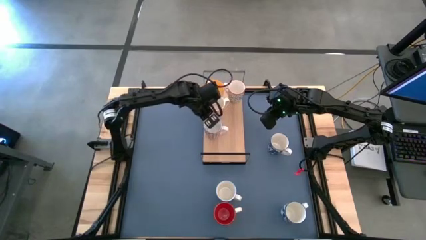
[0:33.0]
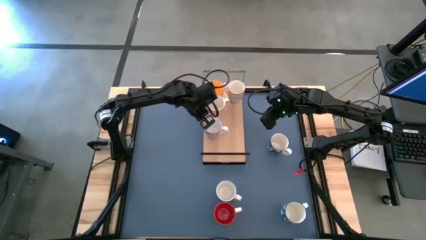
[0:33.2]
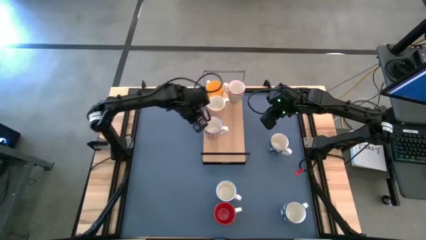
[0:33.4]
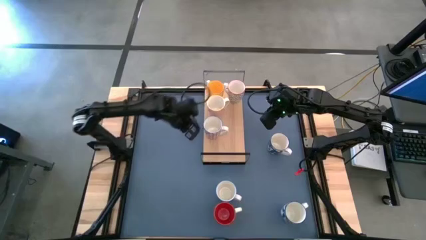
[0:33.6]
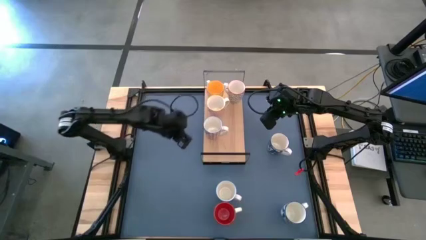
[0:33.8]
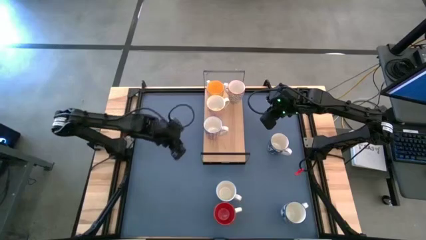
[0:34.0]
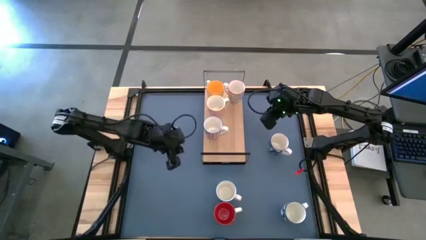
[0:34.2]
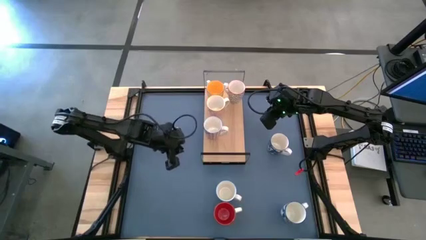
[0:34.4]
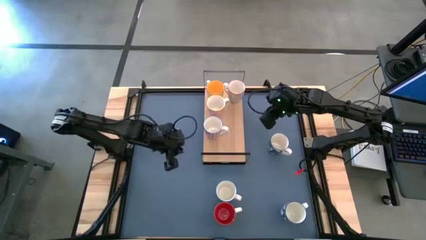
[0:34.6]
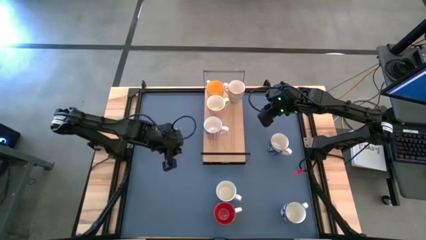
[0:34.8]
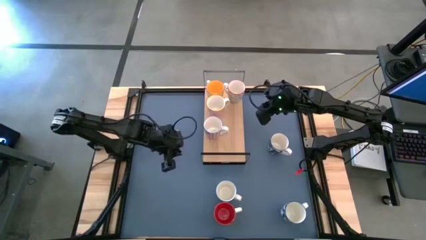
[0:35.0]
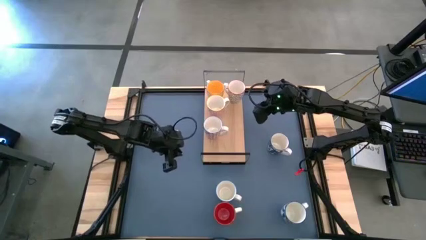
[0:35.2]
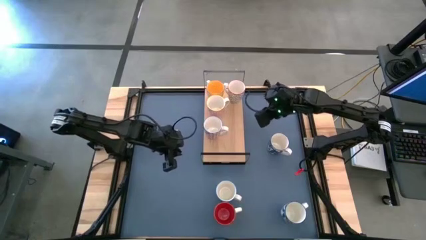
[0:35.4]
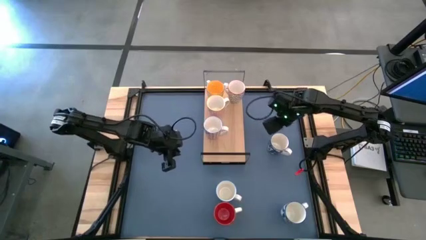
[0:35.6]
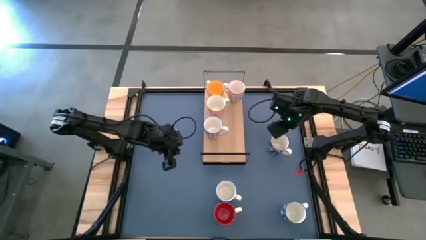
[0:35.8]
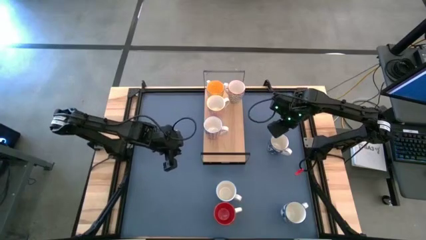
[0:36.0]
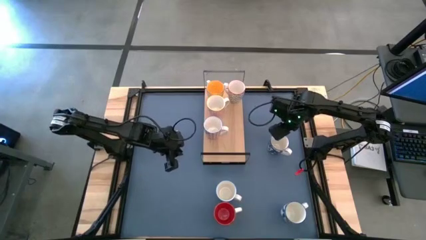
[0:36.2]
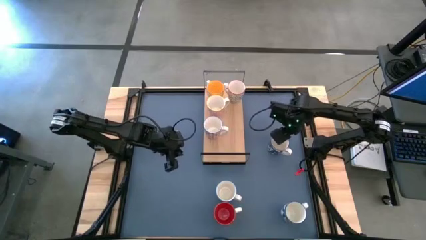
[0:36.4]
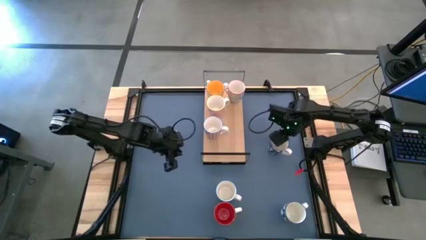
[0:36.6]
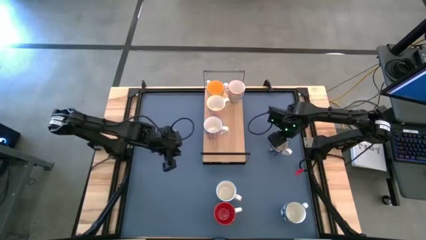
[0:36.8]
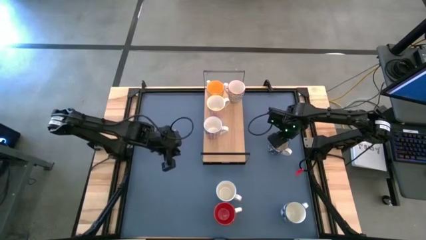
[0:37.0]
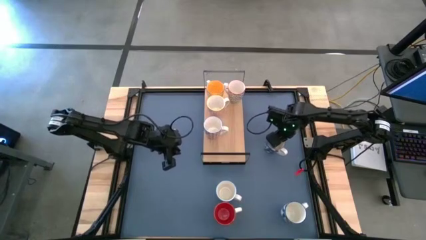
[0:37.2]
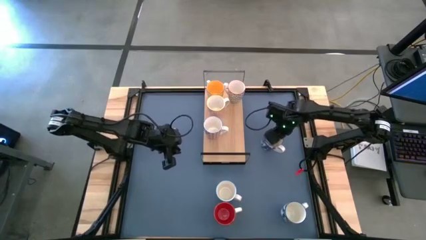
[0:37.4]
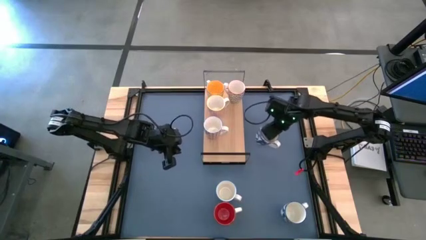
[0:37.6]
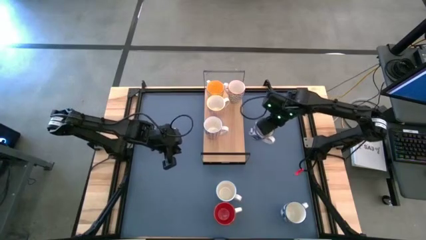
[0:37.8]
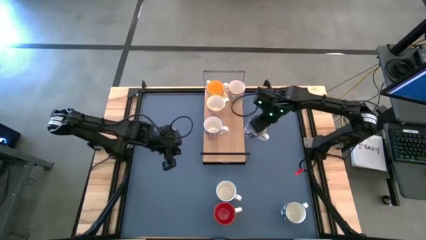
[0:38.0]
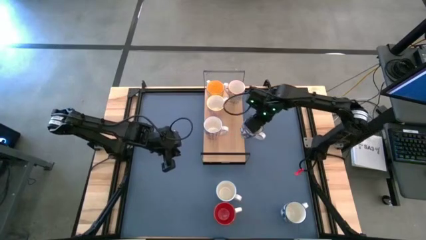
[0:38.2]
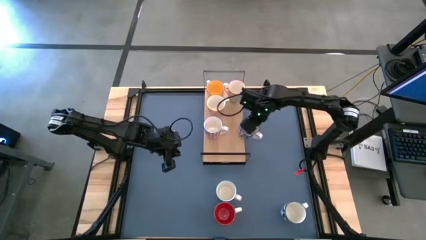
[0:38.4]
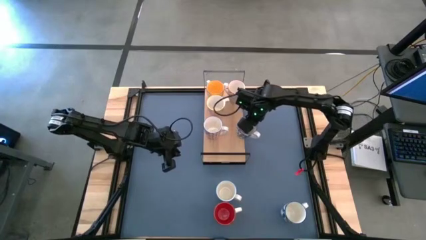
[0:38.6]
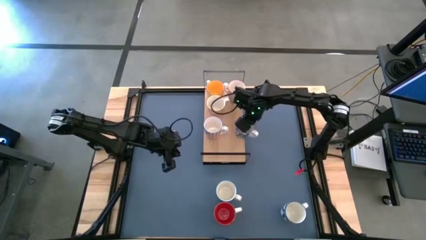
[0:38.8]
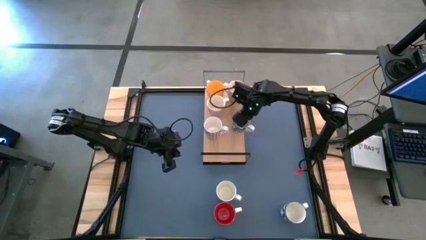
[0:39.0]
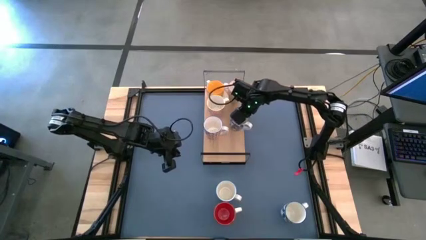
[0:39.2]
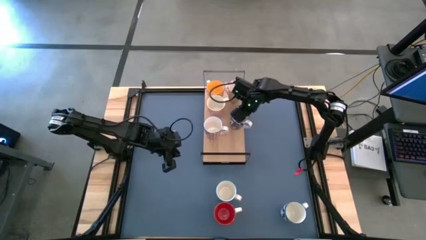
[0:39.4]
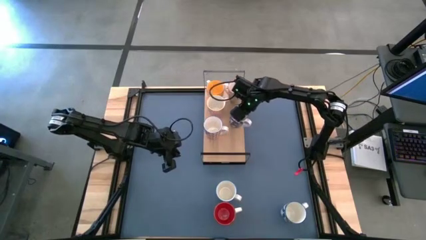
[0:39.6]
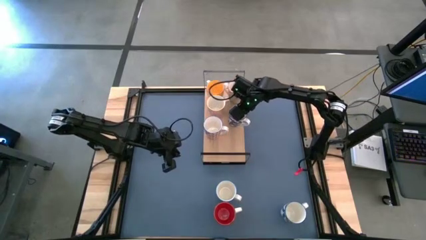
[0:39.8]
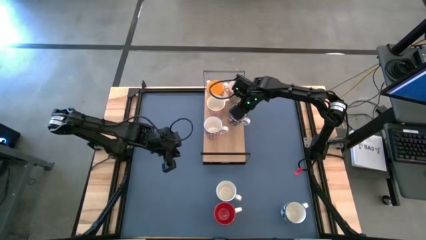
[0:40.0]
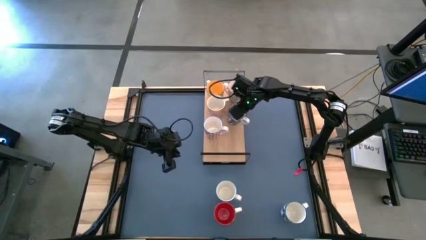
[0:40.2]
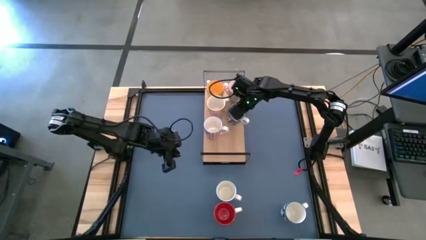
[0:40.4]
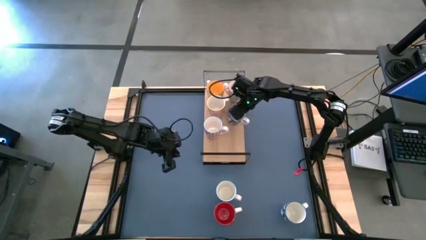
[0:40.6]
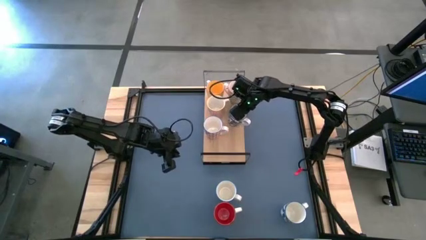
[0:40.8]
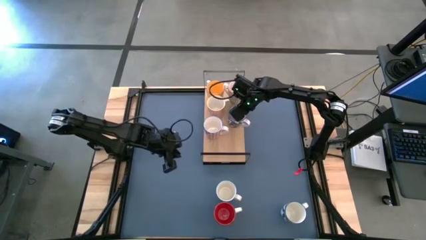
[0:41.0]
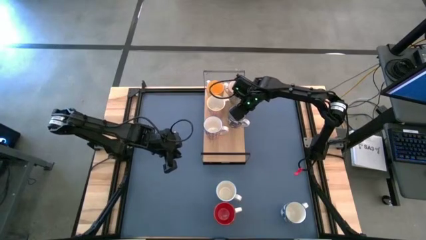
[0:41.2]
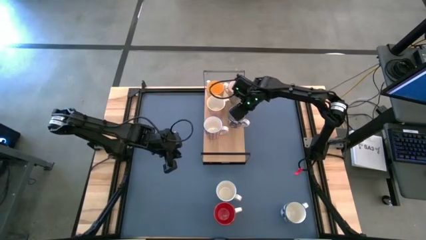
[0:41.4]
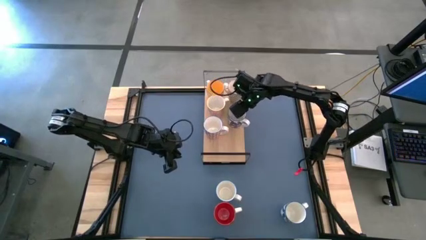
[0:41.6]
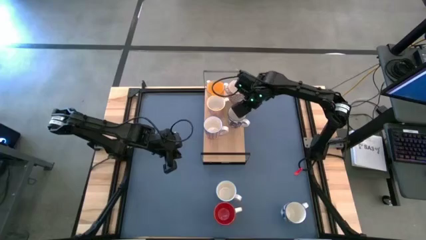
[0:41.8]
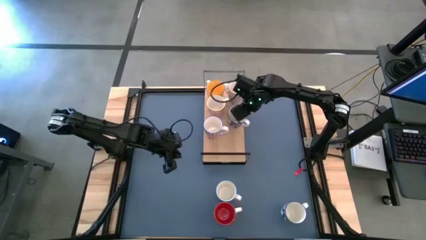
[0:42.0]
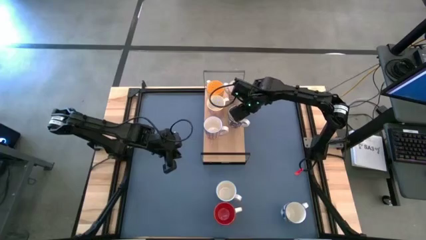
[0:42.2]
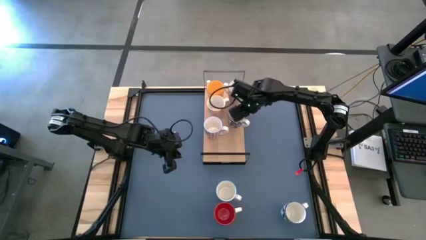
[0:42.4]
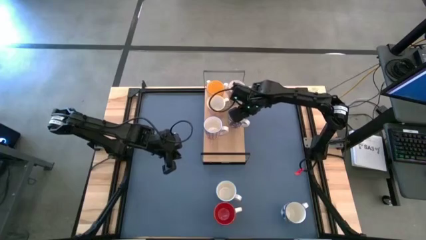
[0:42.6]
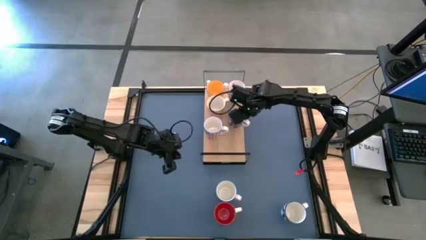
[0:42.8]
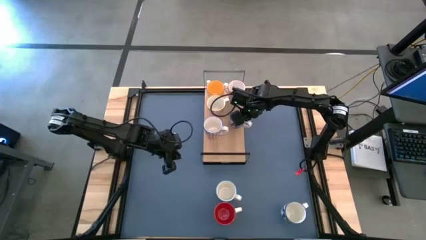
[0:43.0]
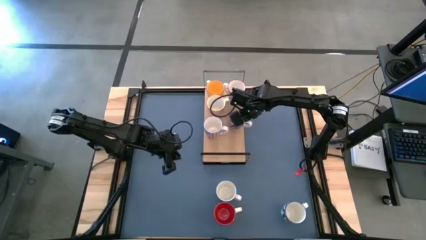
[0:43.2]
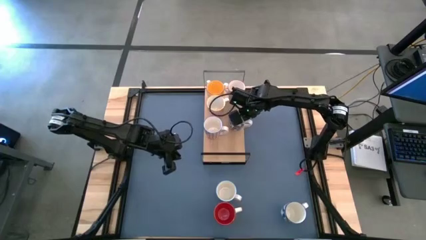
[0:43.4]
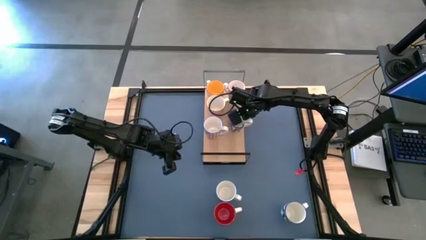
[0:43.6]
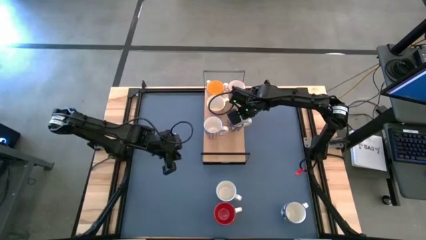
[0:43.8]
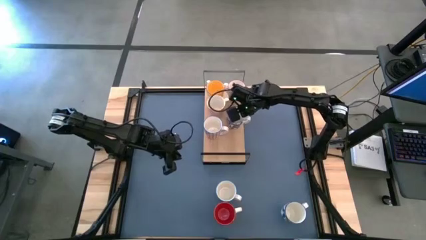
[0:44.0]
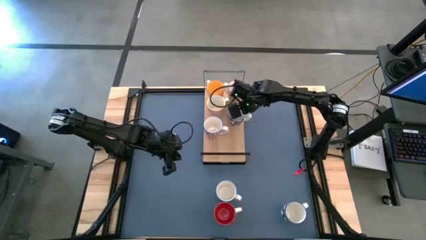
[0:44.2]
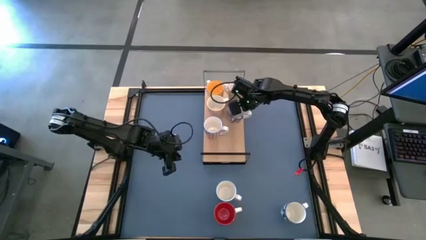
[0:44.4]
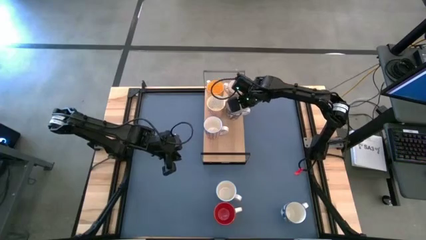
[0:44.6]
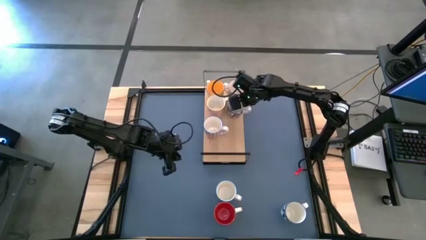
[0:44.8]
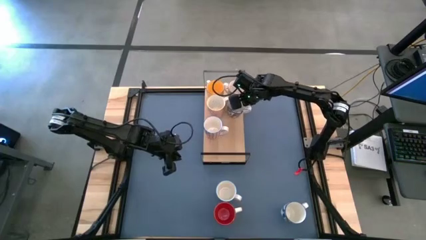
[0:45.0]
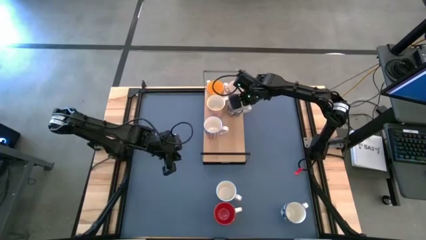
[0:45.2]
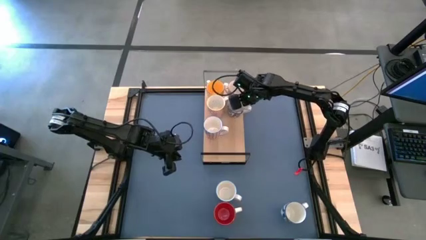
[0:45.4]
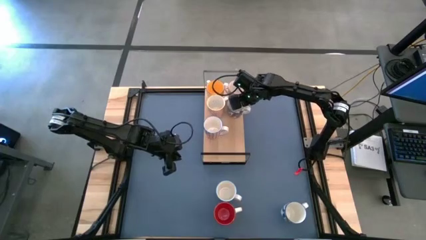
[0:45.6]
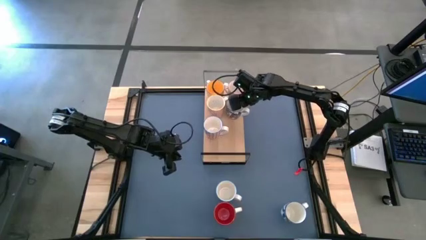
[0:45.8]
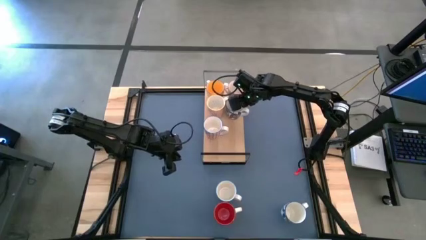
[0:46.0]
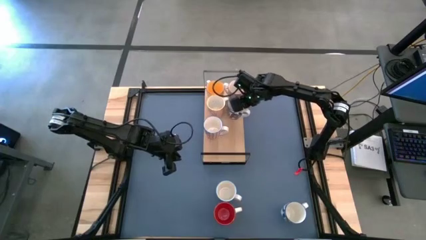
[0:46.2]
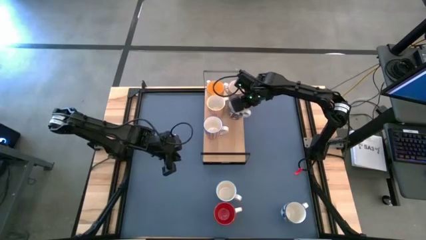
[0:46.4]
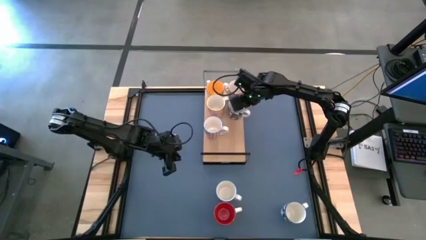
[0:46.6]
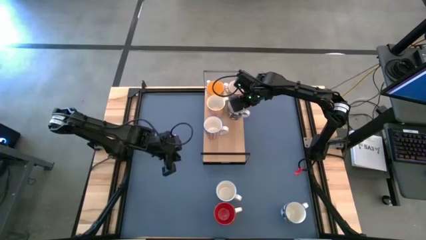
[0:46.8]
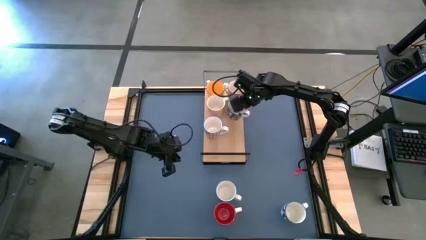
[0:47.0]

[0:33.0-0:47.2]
Task: Place coffee mugs
Put the top blue mug on the shelf
